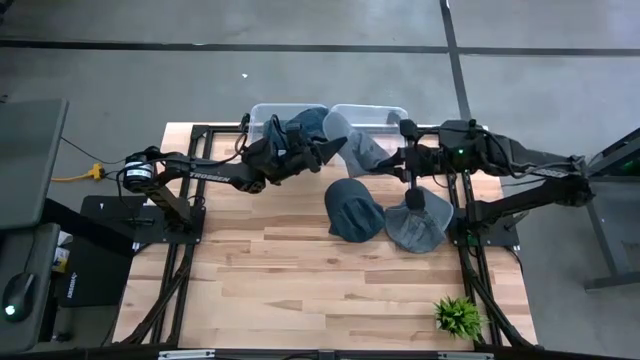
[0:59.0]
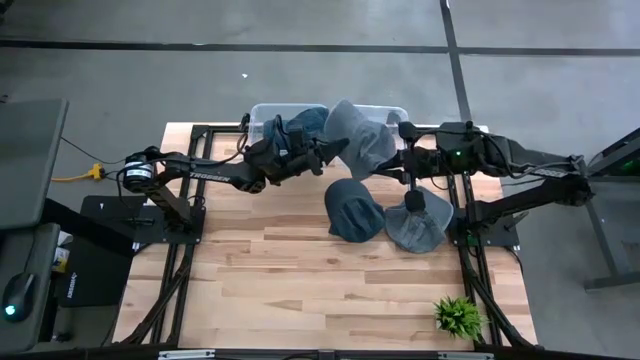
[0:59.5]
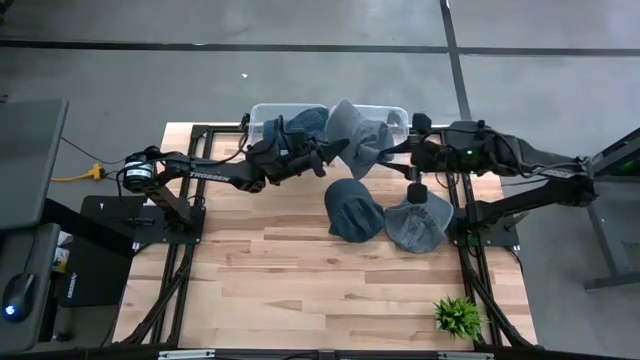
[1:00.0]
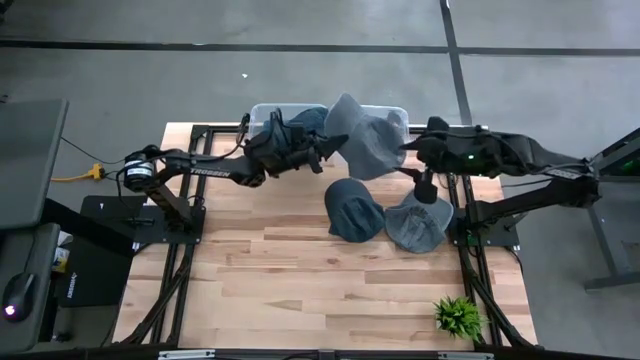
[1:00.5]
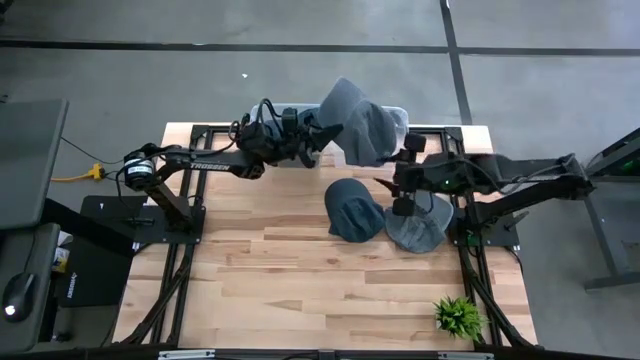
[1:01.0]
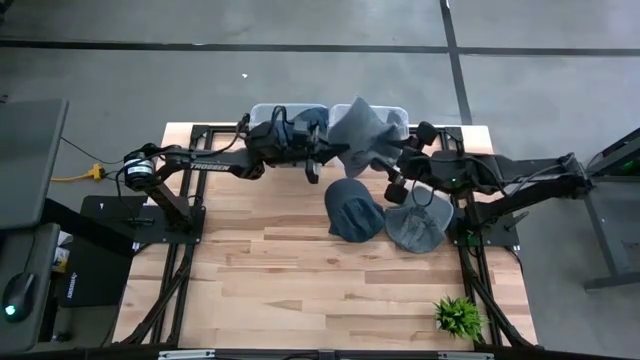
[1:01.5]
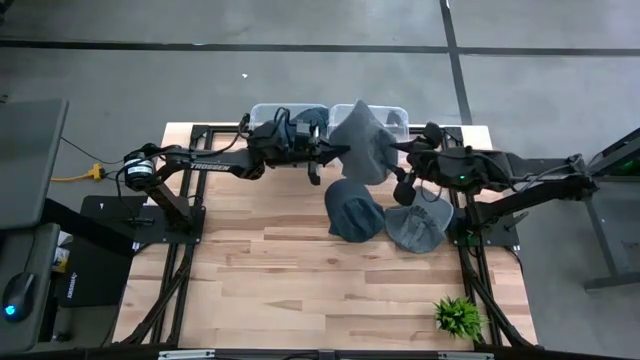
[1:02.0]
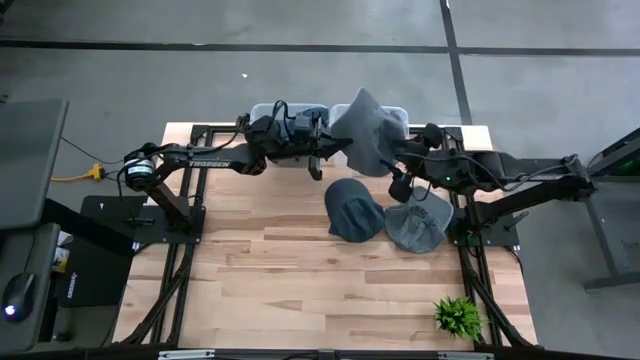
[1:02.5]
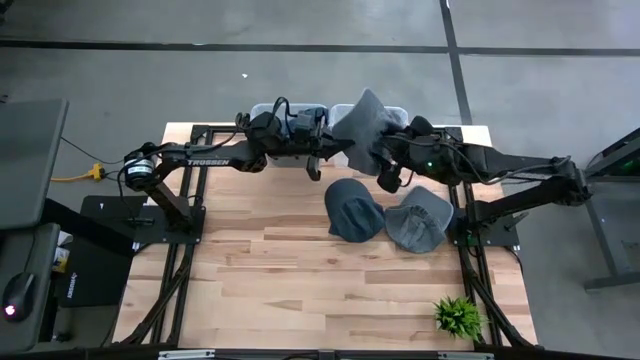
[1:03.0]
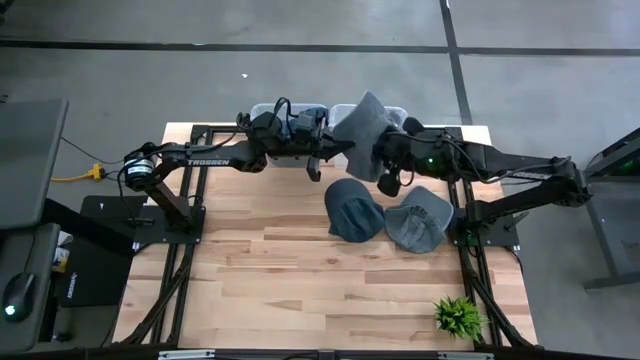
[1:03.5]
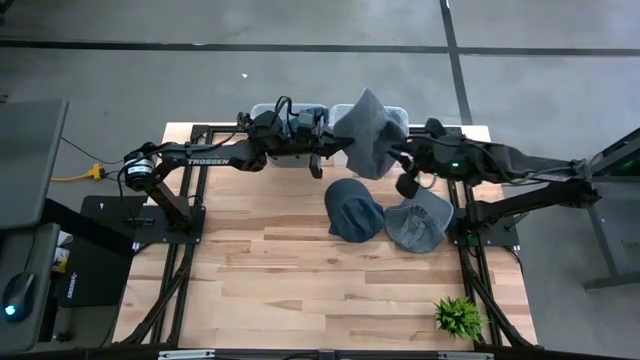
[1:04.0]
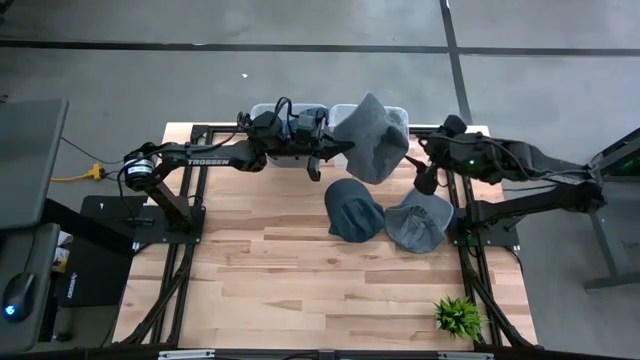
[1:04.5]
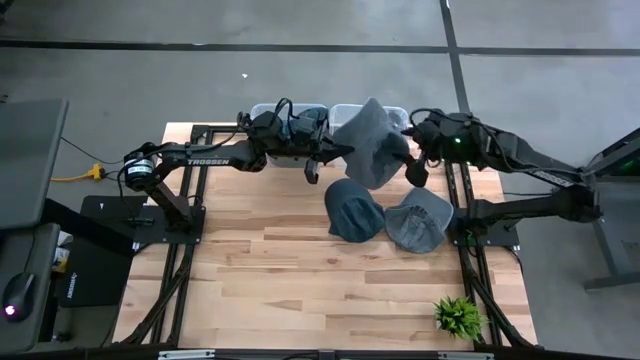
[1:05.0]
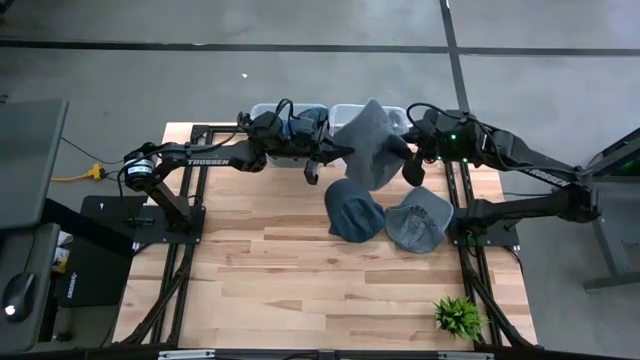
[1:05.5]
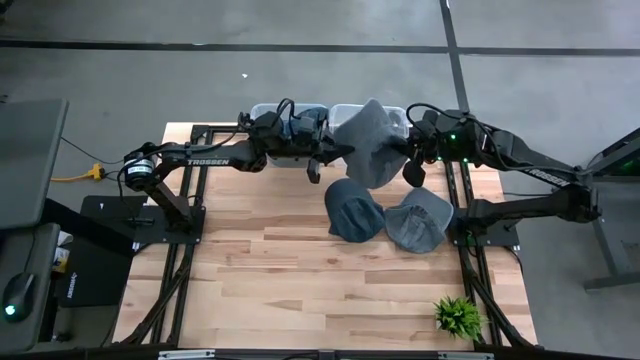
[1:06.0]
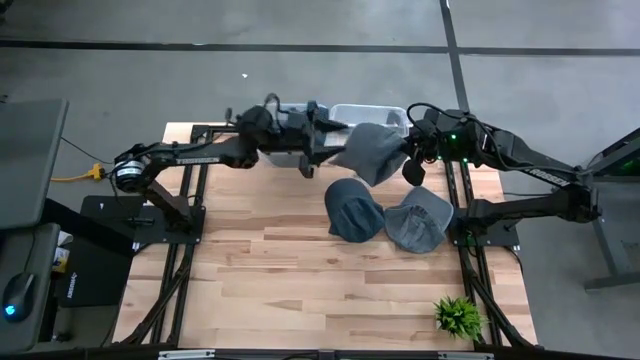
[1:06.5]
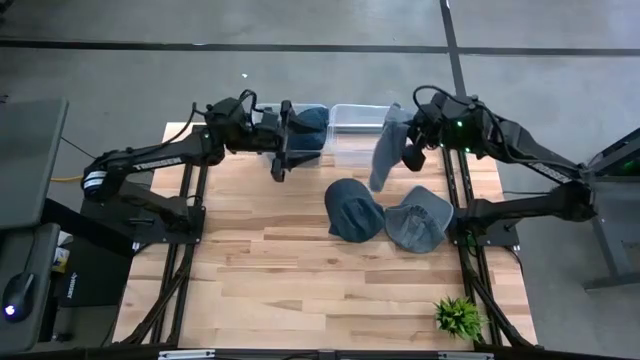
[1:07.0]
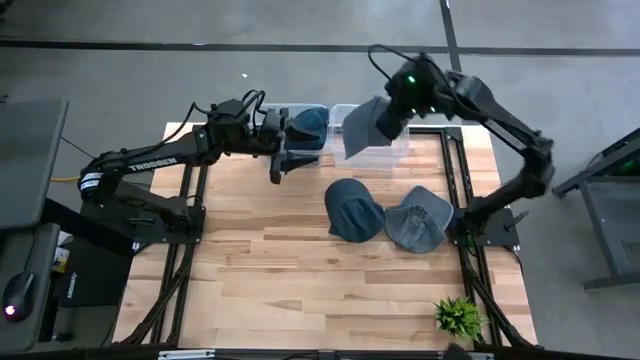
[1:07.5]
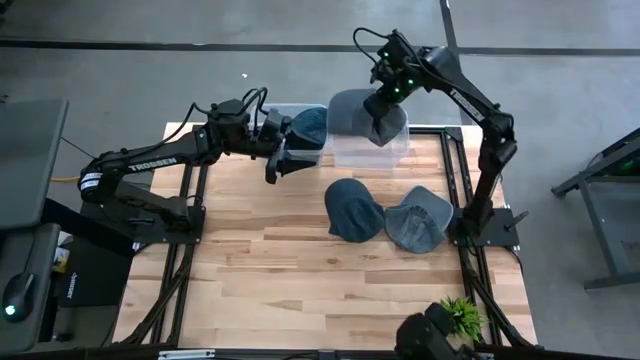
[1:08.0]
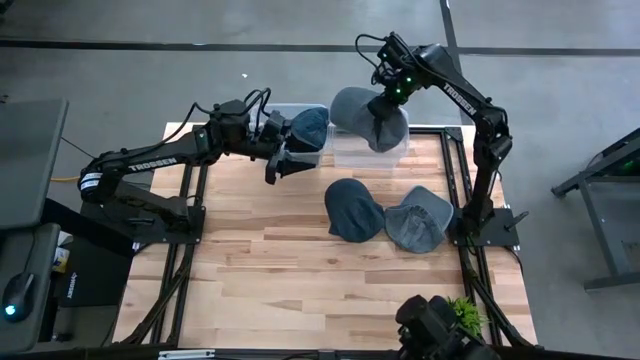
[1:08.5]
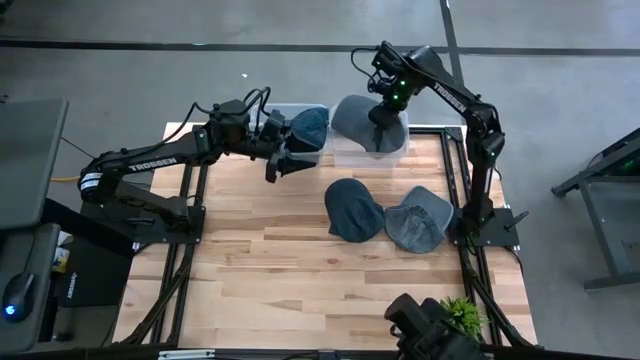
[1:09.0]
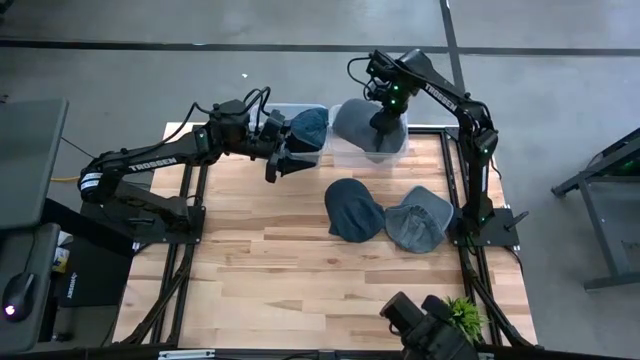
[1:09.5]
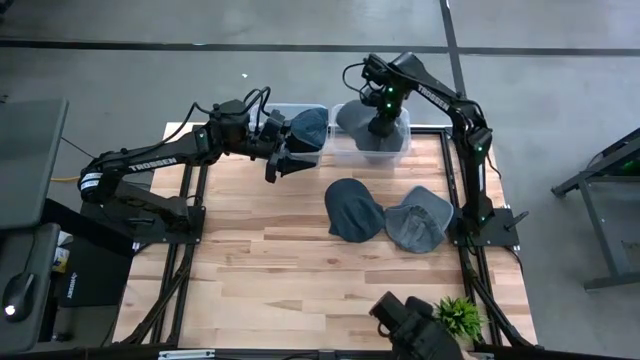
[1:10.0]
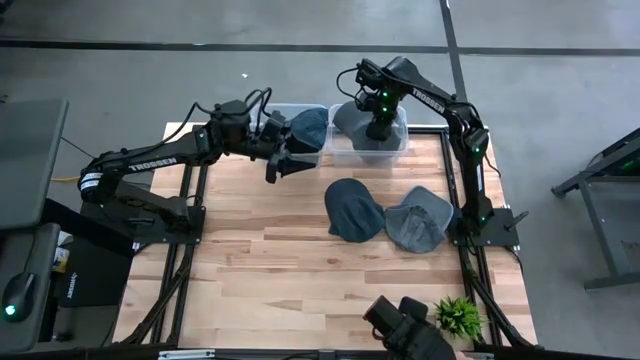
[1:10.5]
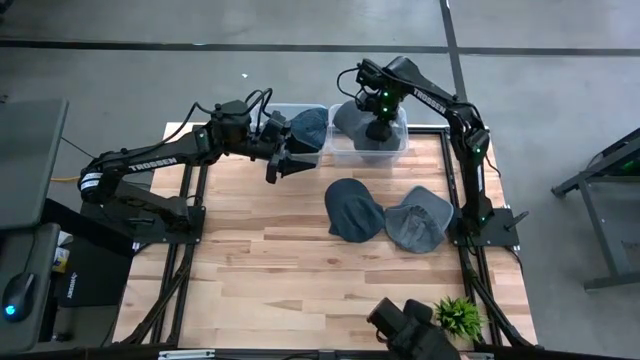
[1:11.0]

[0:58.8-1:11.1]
Task: Pick and place caps into container
Put the left gray cap into the right transparent container

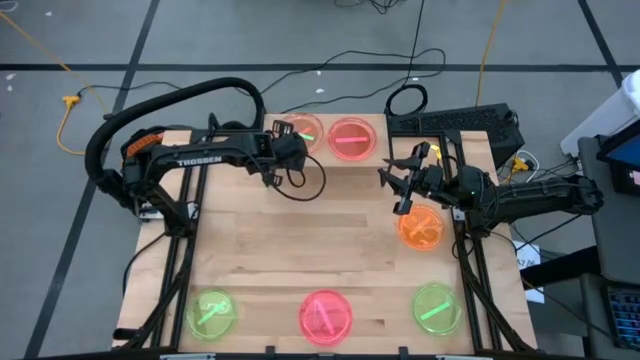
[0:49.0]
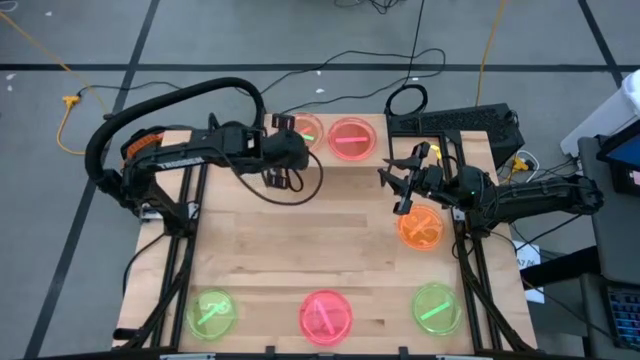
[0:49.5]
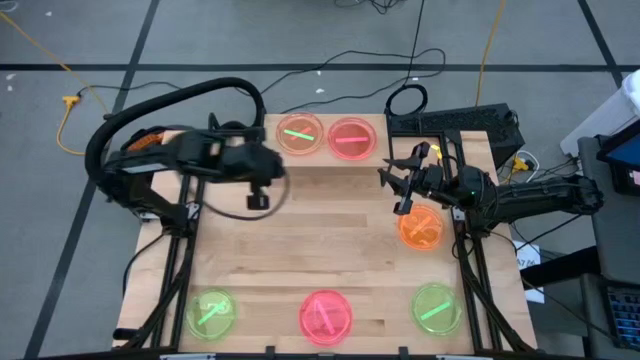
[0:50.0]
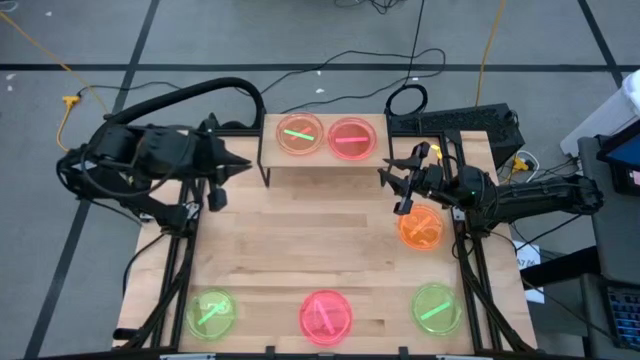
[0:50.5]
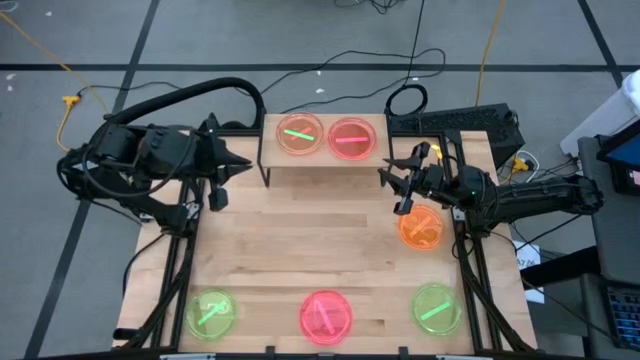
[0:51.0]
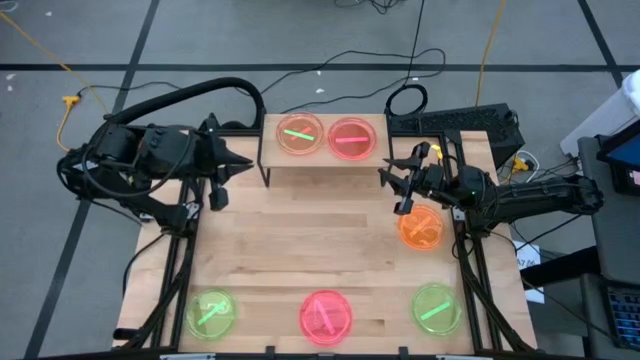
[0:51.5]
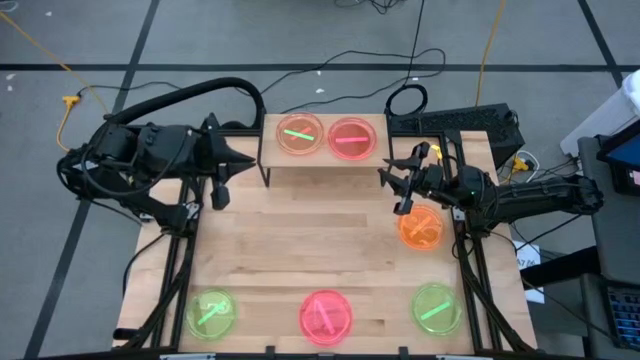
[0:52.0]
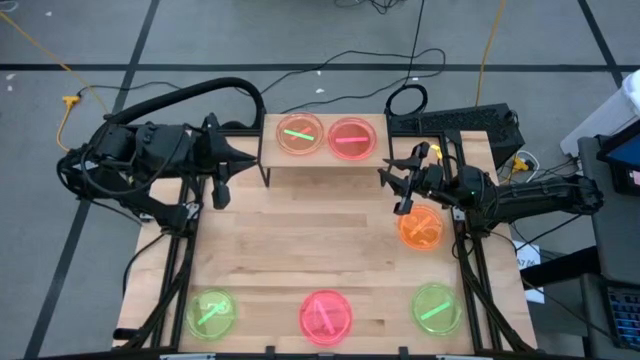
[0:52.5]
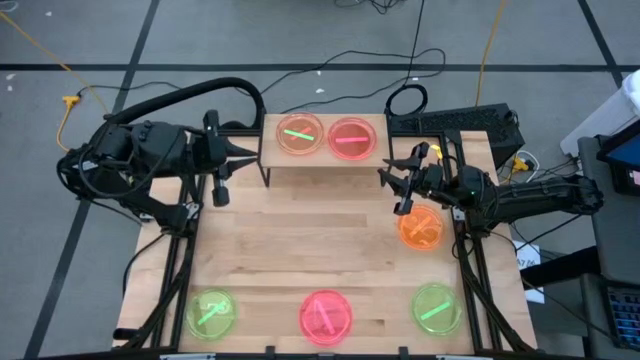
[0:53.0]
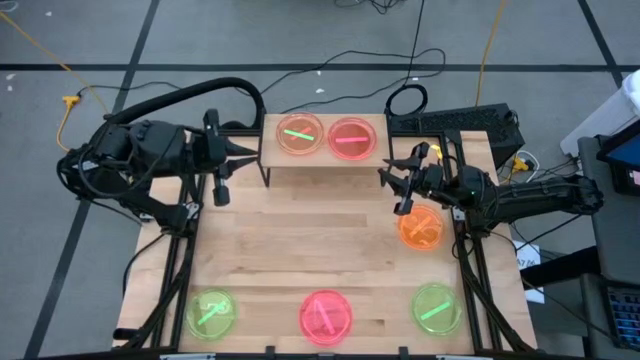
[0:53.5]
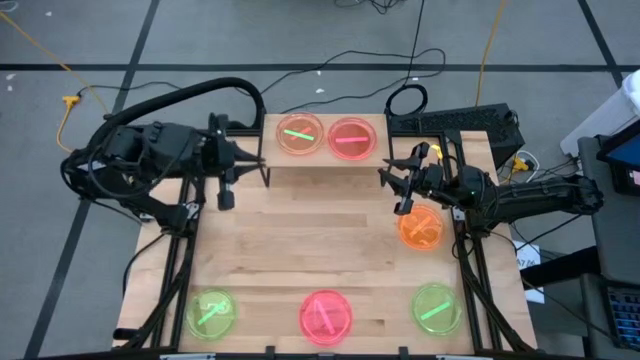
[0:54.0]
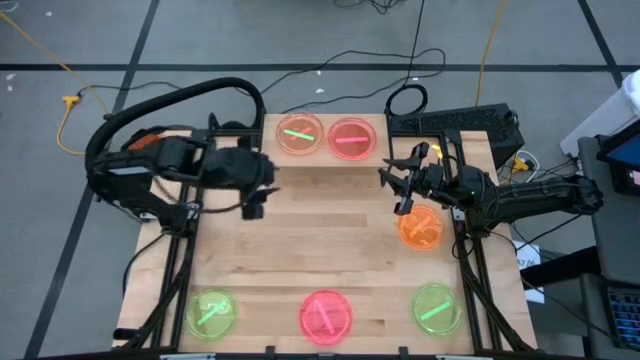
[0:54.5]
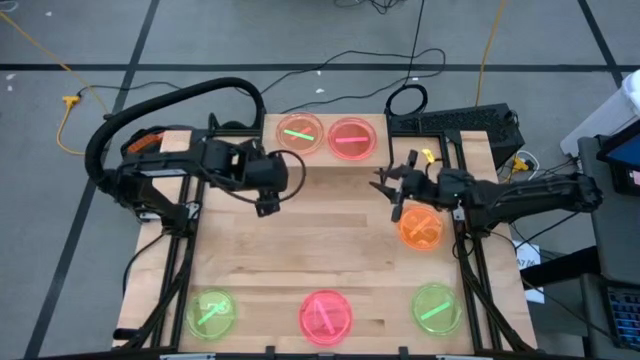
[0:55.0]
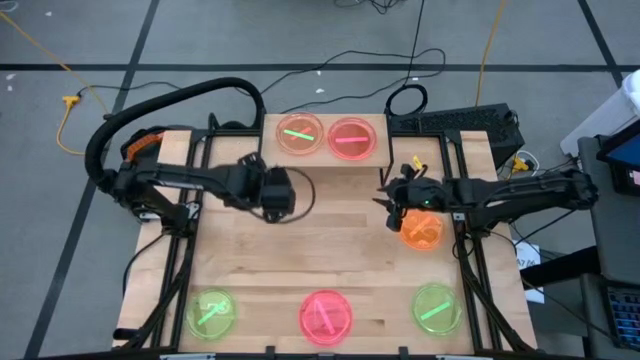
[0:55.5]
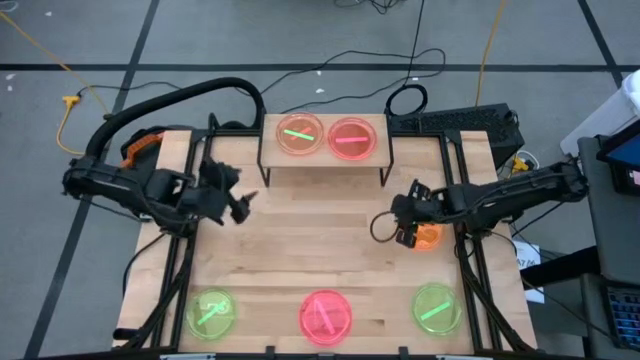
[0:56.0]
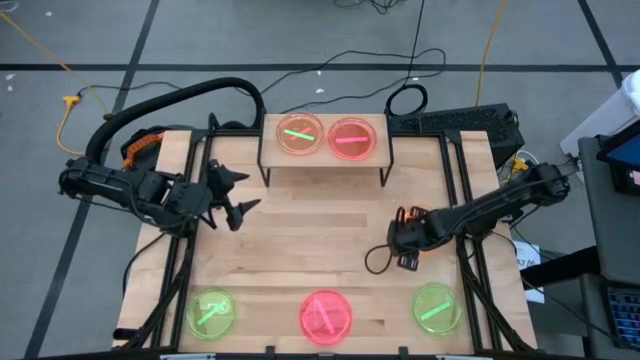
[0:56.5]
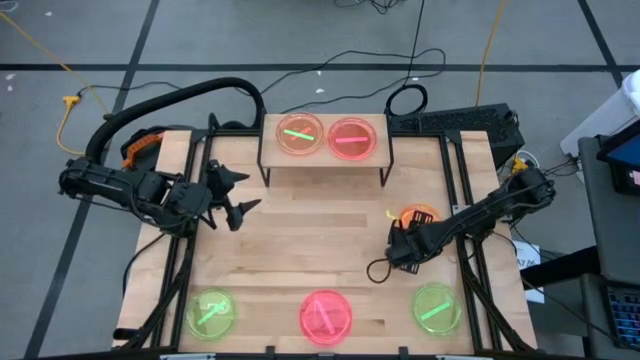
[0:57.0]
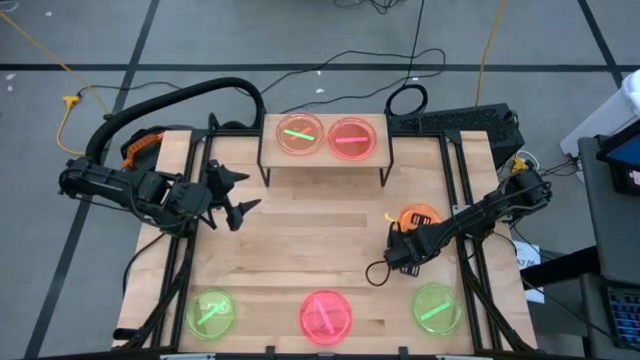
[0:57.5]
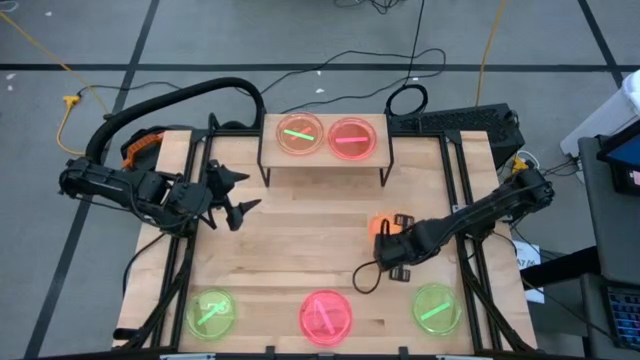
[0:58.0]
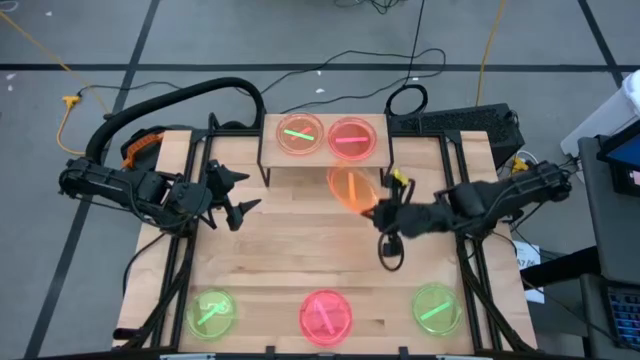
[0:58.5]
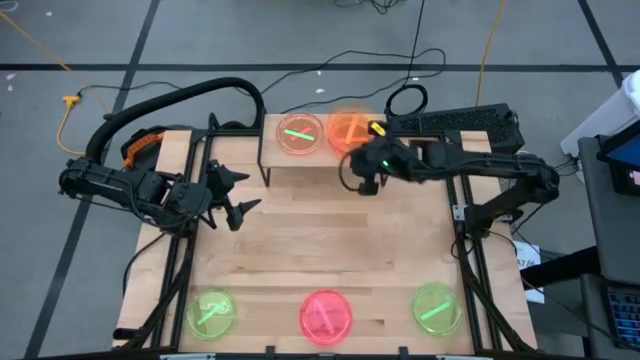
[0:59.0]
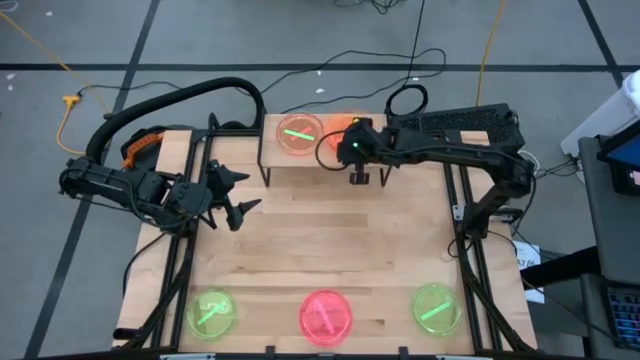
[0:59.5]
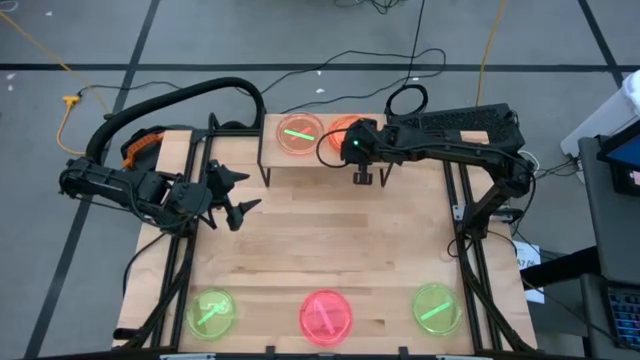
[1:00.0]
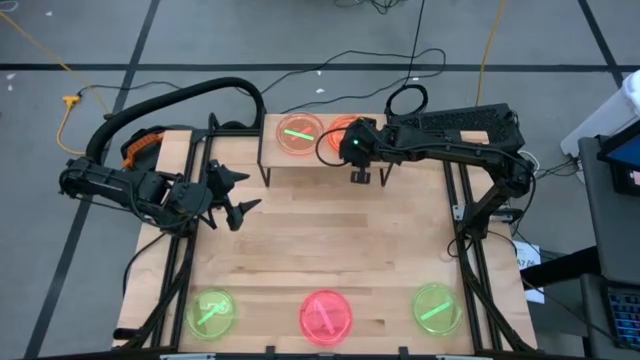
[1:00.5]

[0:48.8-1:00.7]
Task: Place and stack plates onto a shelf
Stack the orange plate on top of the pink plate on the shelf
